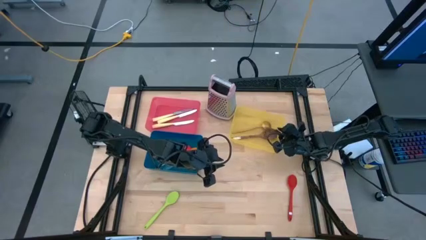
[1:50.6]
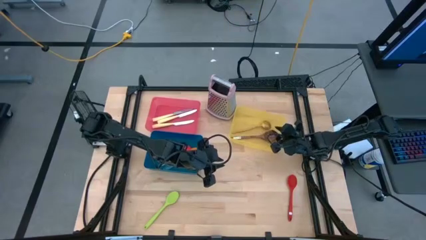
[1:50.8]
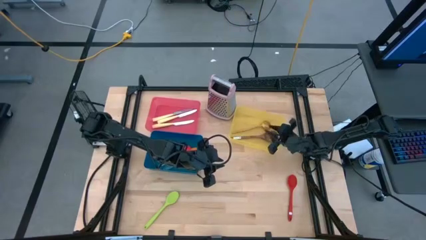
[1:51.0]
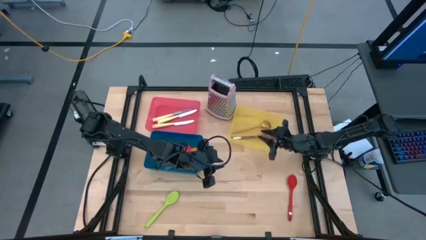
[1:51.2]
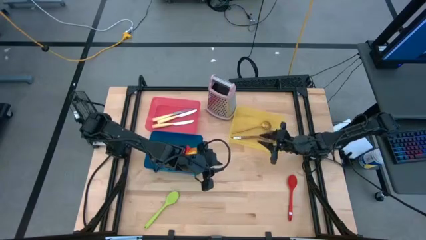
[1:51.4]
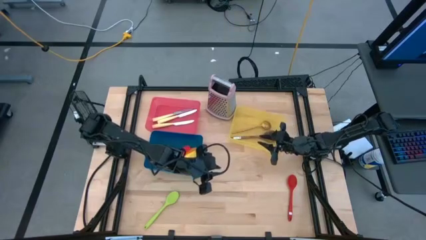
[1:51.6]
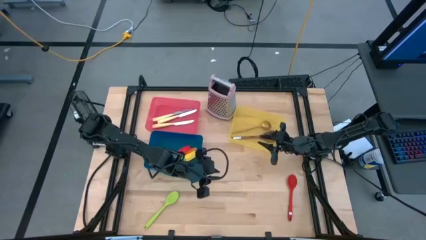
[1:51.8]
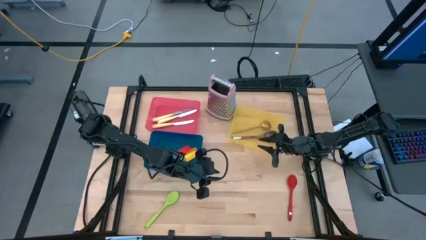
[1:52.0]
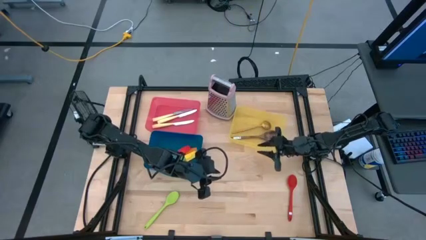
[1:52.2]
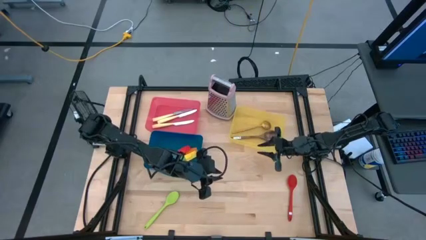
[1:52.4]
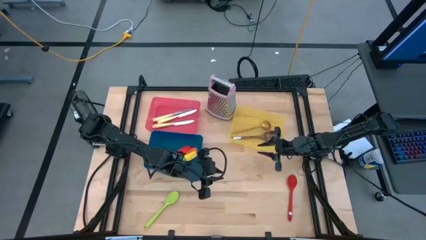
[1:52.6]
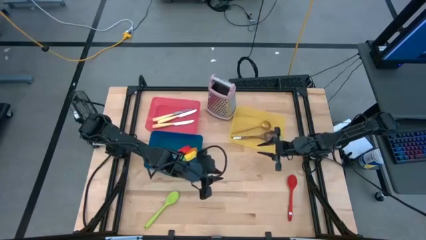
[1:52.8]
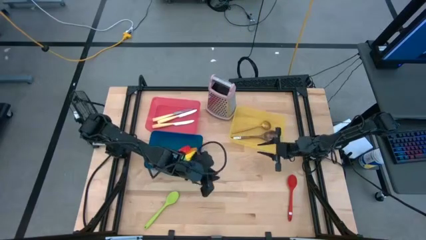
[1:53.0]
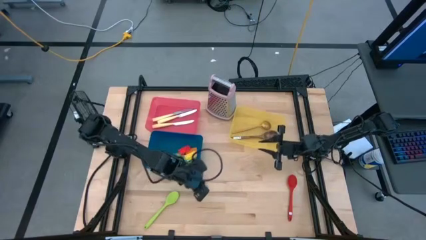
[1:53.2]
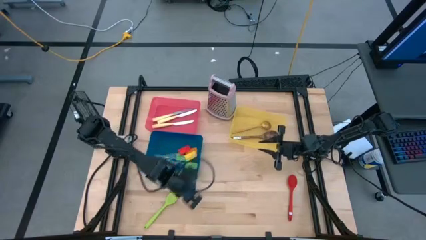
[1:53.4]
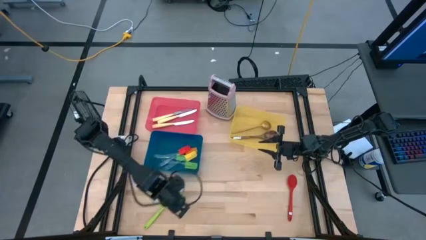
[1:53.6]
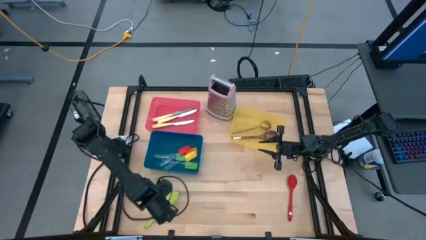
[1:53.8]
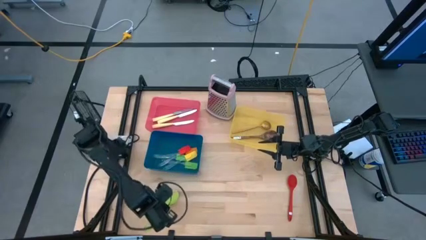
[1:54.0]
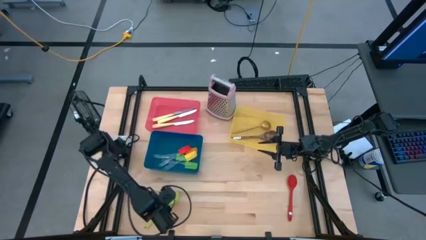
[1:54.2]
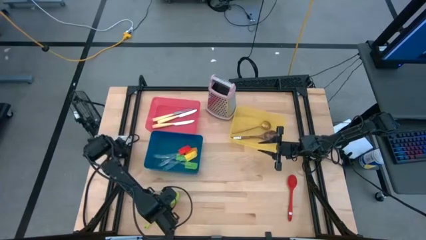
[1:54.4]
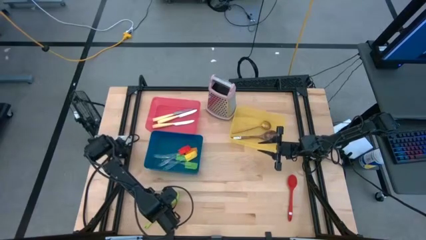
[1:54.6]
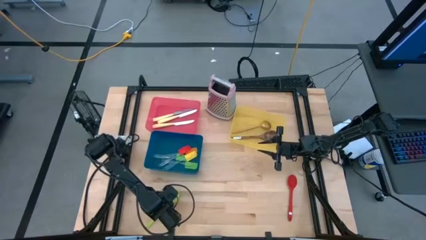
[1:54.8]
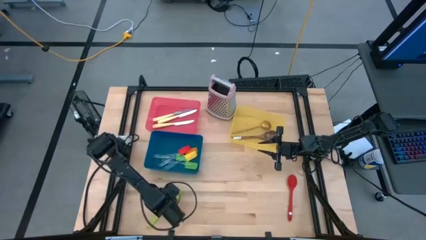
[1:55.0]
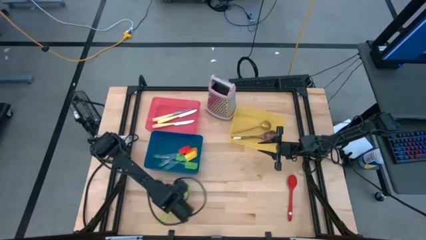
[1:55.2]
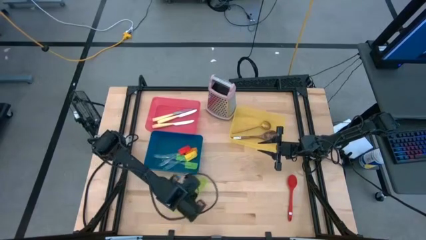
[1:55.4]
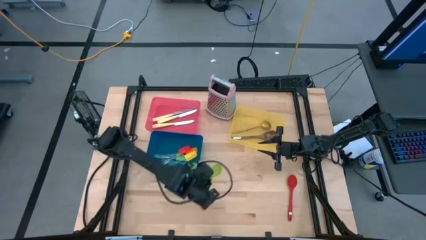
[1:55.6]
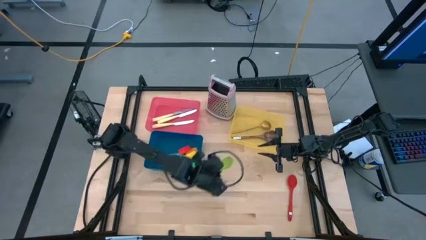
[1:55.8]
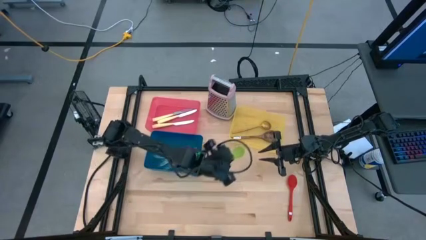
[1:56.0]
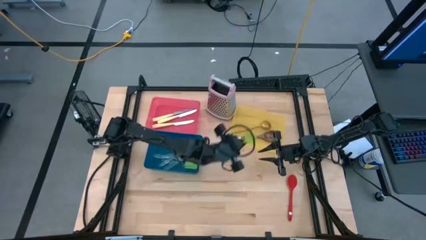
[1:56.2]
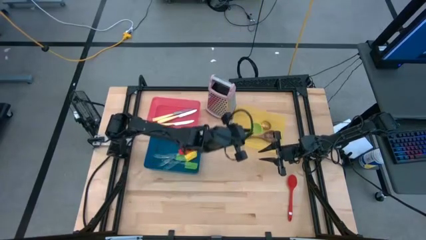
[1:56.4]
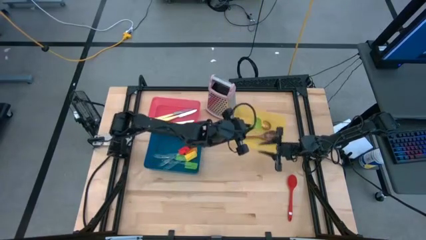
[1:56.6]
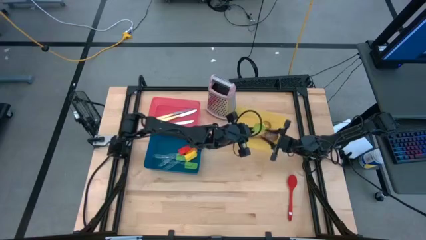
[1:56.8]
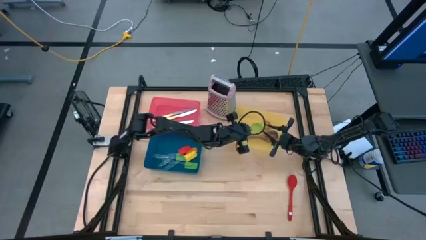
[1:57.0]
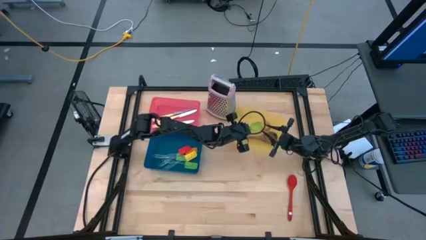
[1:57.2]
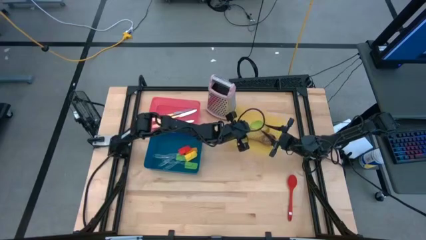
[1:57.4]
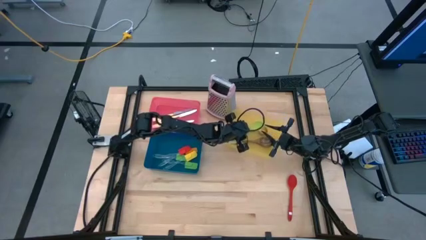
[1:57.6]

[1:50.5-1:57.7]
Task: Pick & Place Kitchen Items
Put the green spoon into the yellow bin

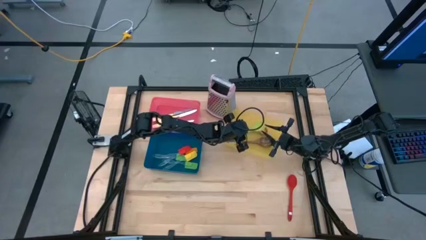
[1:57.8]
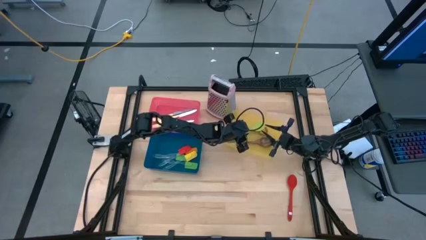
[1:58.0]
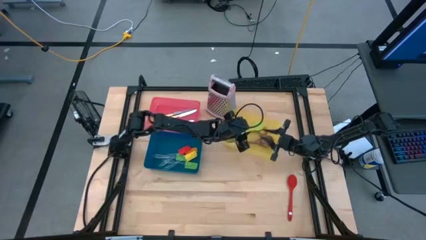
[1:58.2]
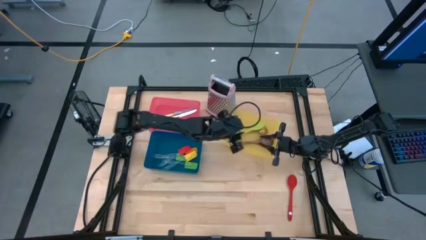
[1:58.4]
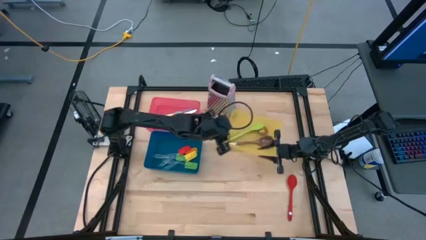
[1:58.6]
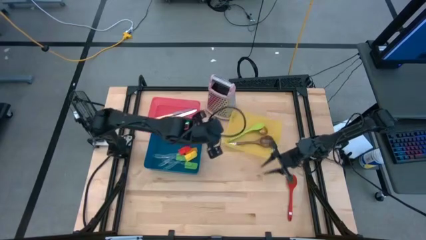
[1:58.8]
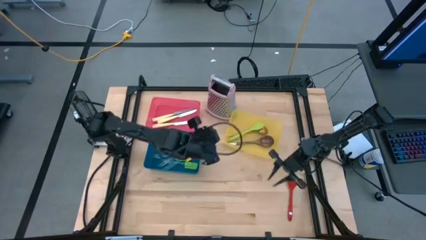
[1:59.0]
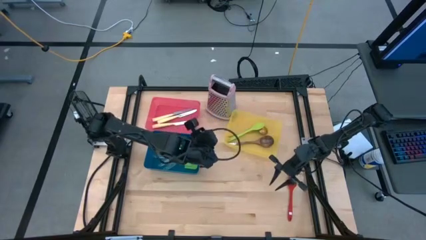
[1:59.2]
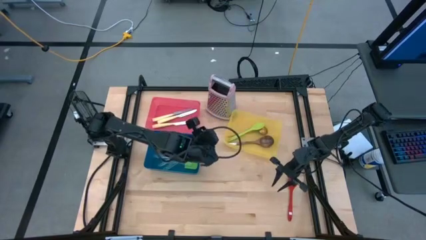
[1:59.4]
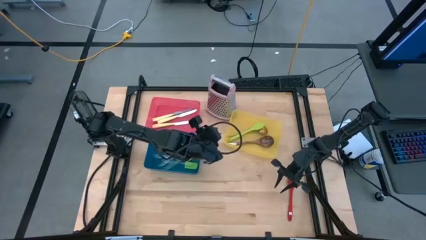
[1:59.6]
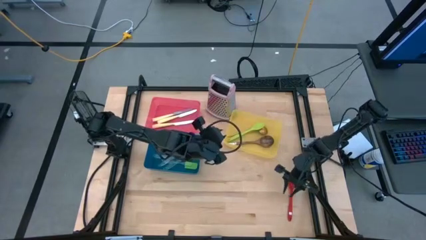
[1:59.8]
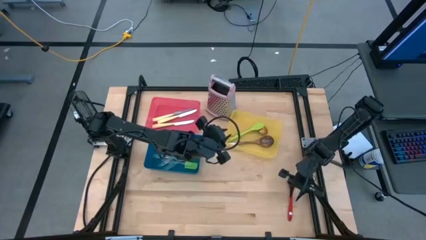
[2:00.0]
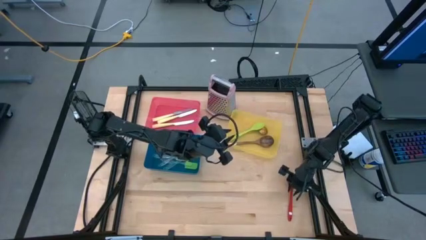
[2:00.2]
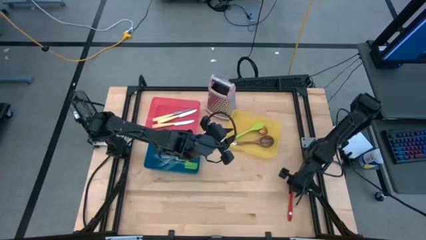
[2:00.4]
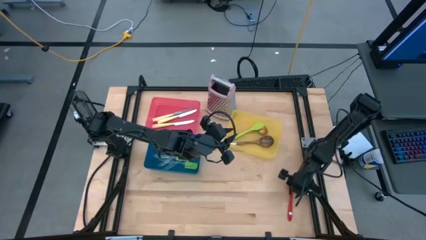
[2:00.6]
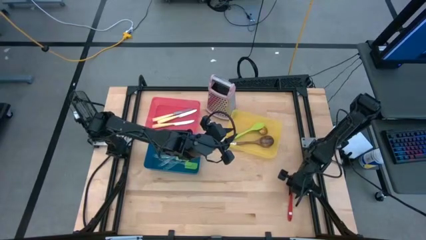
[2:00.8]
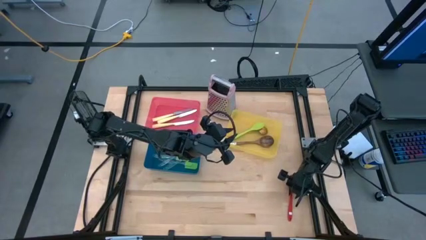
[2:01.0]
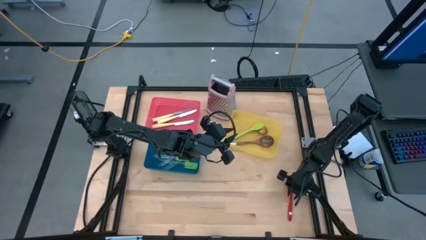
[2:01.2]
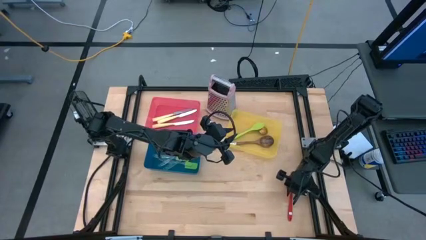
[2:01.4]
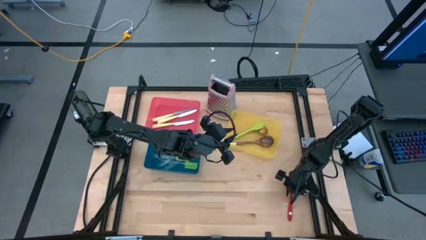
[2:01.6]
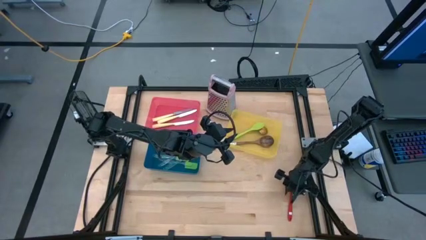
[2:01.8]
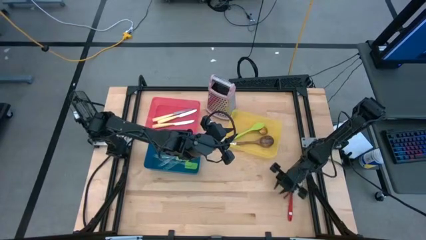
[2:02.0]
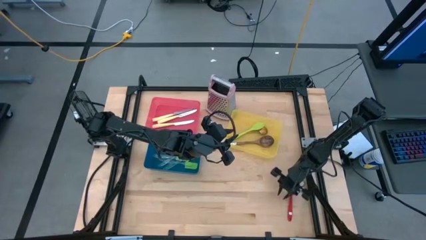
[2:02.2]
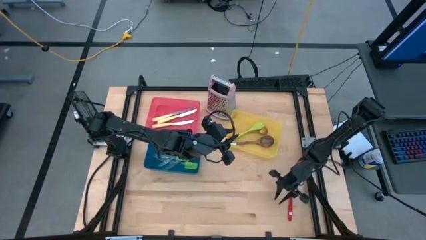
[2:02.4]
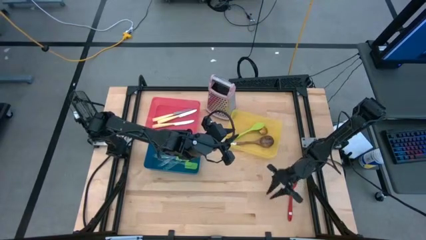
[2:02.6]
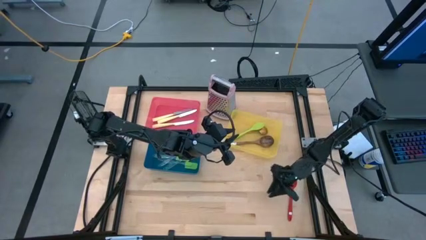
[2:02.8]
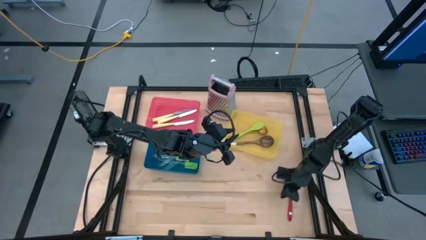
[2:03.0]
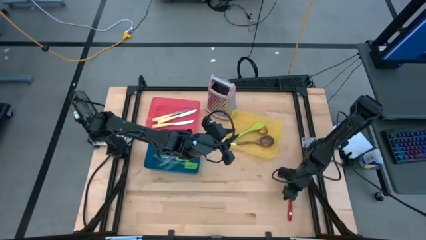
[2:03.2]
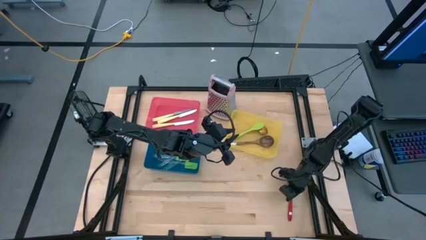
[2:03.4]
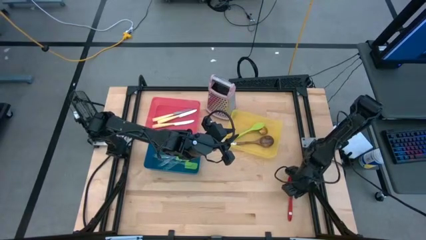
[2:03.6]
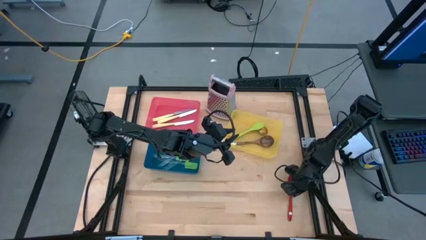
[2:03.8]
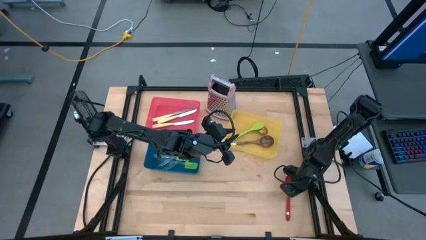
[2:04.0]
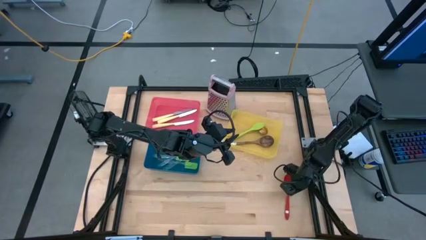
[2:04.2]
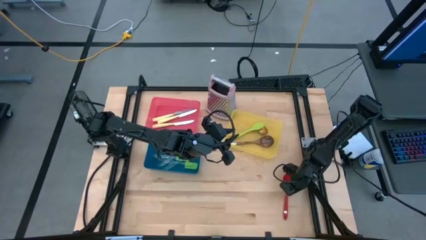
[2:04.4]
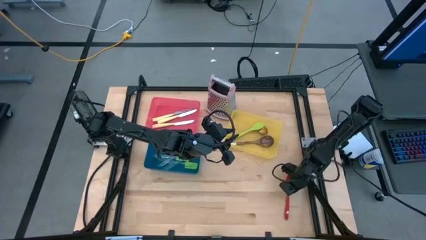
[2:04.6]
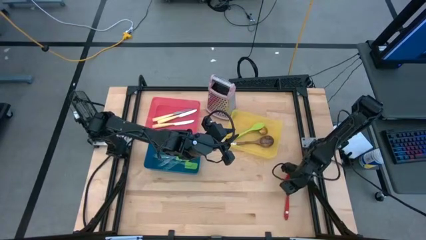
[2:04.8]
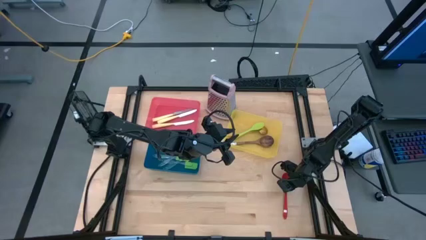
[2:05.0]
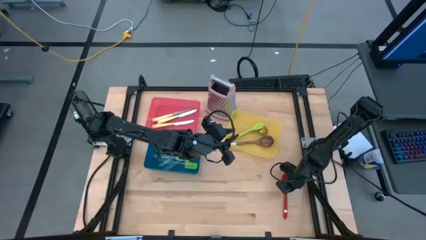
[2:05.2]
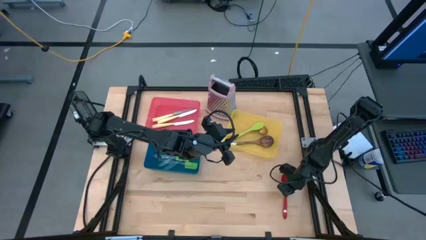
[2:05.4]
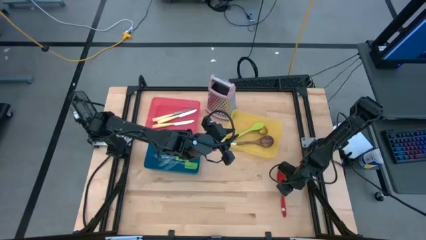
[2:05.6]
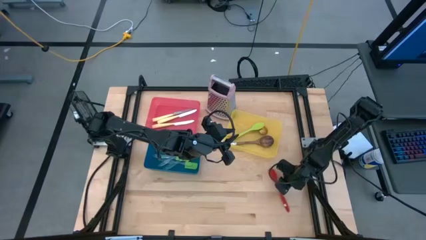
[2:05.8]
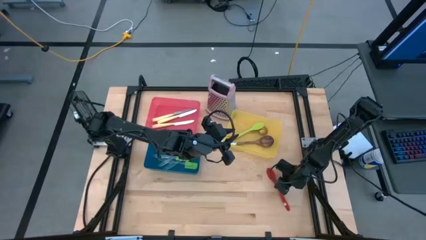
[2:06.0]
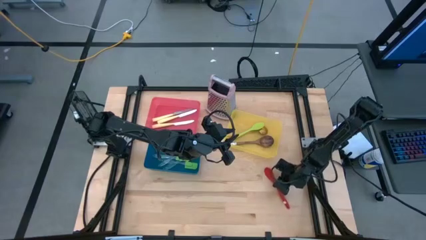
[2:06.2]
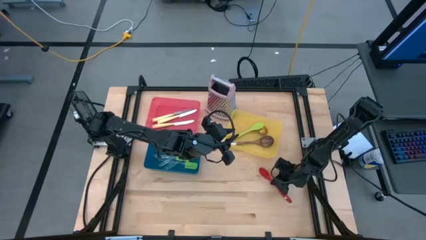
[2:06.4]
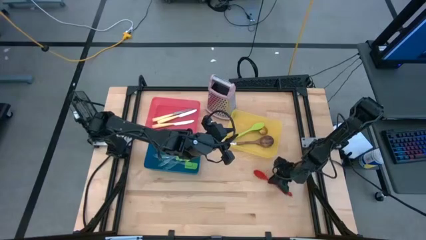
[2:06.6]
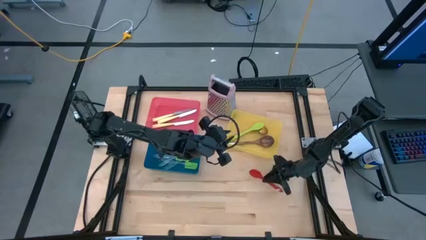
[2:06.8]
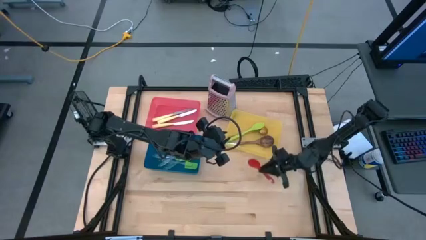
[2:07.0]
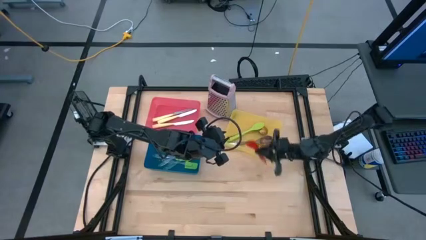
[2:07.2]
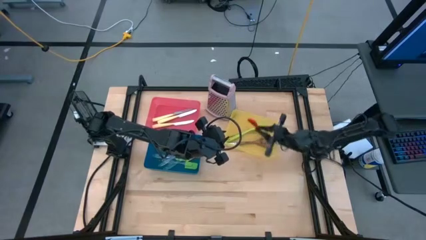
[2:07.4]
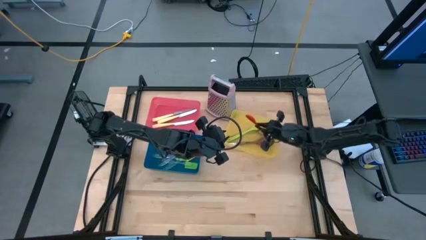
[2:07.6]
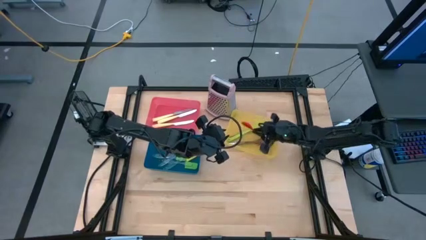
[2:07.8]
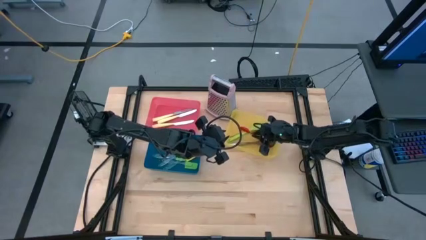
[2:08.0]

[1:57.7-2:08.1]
Put the red spoon into the yellow bin
